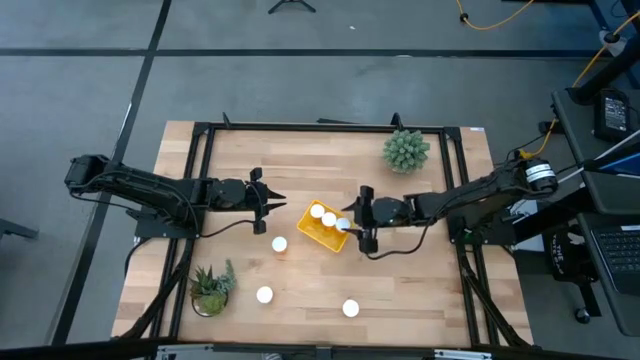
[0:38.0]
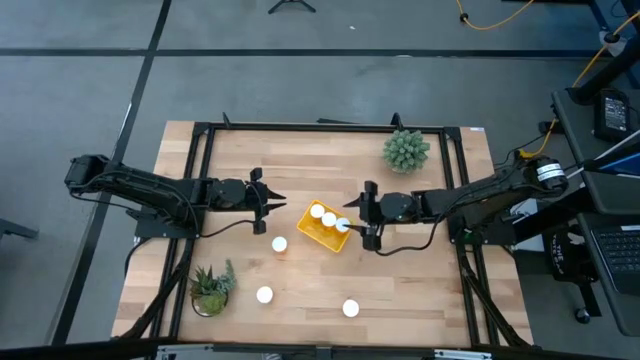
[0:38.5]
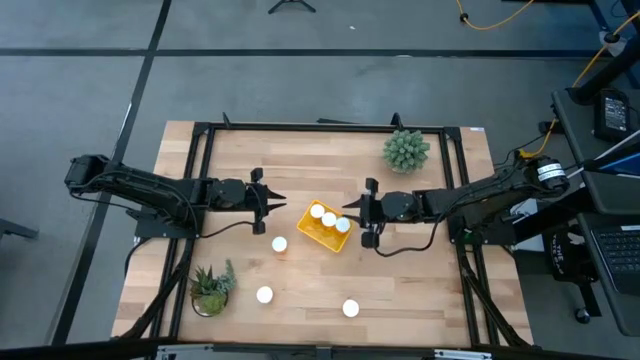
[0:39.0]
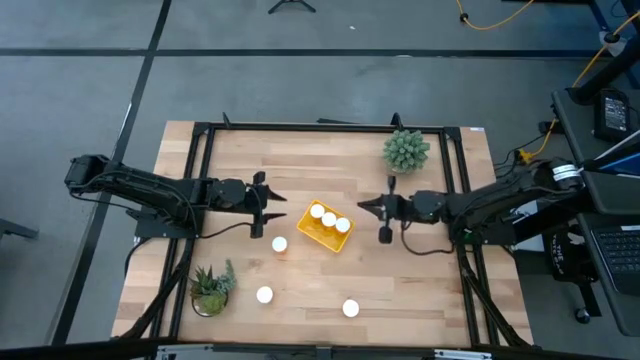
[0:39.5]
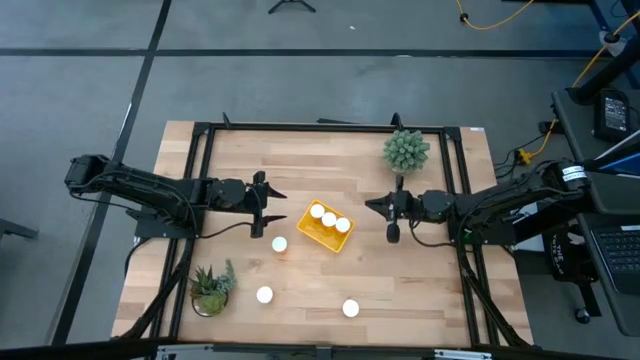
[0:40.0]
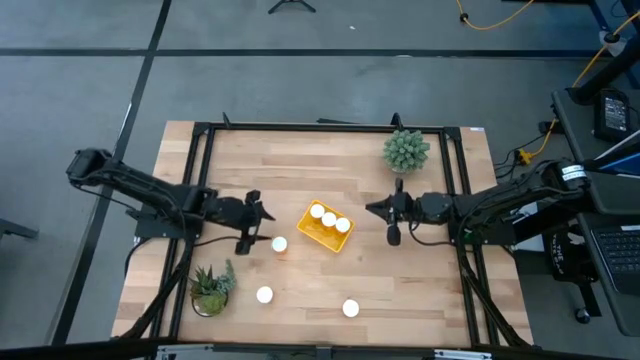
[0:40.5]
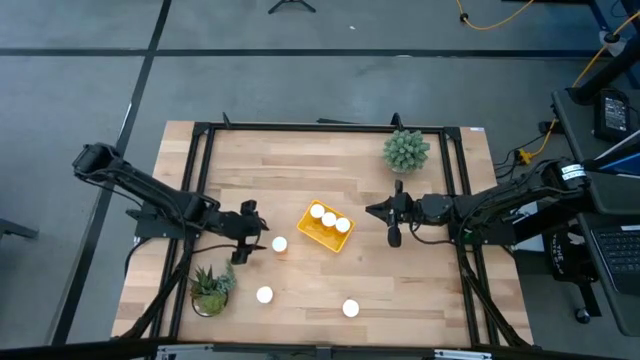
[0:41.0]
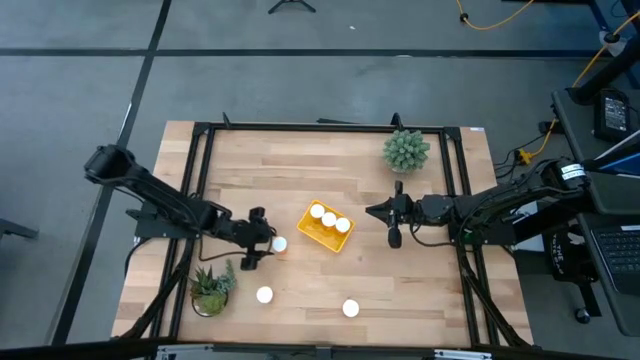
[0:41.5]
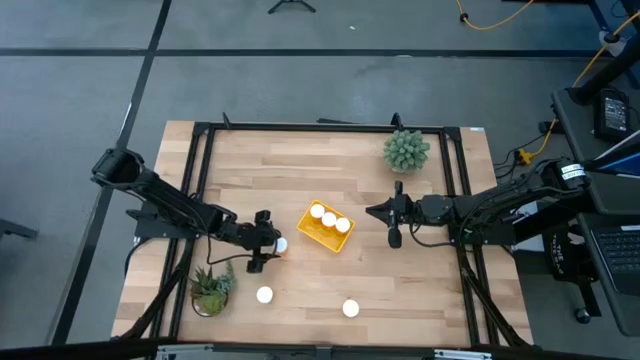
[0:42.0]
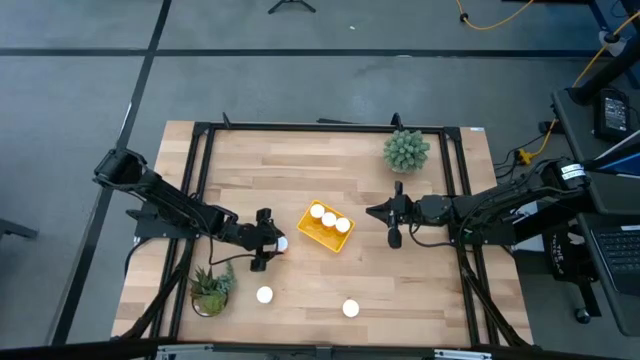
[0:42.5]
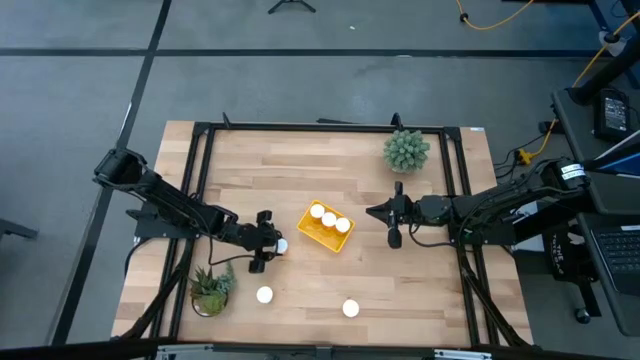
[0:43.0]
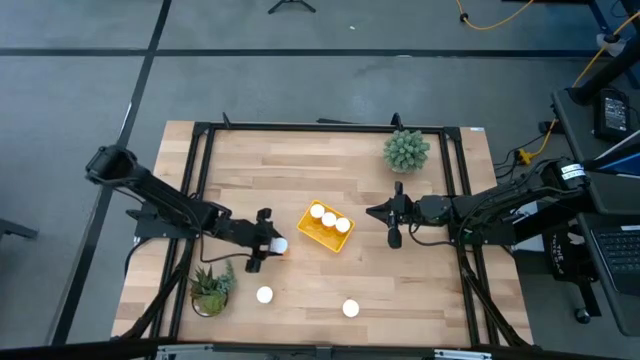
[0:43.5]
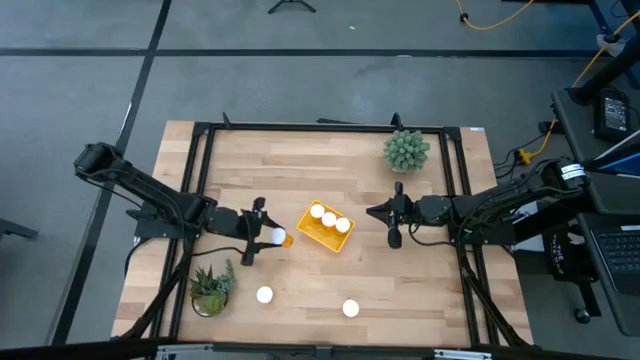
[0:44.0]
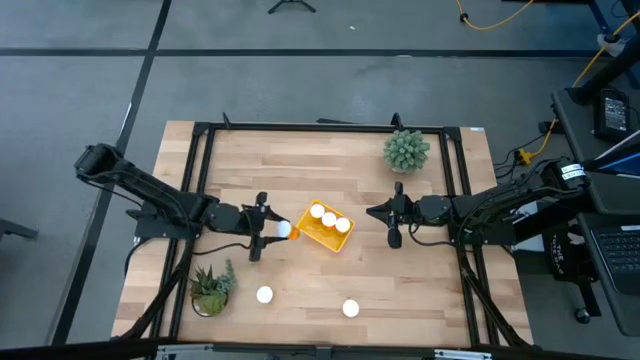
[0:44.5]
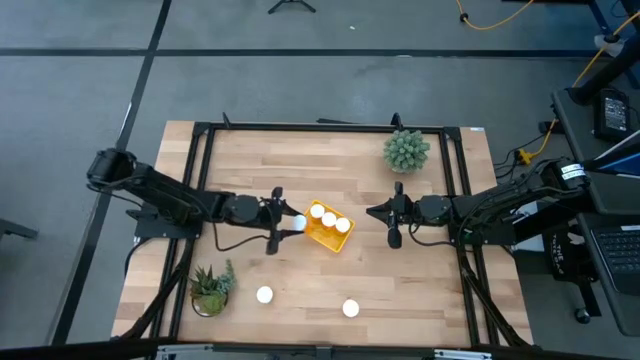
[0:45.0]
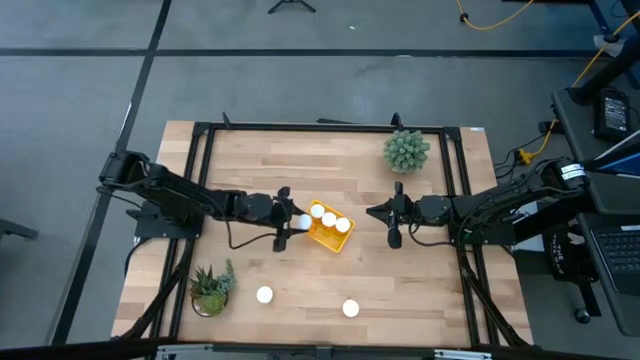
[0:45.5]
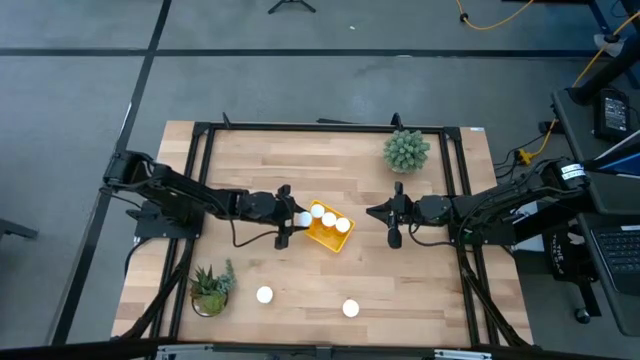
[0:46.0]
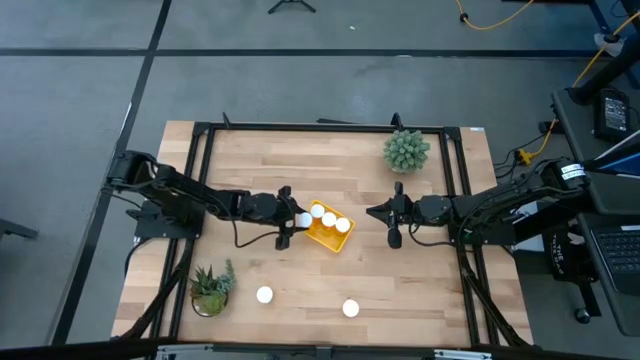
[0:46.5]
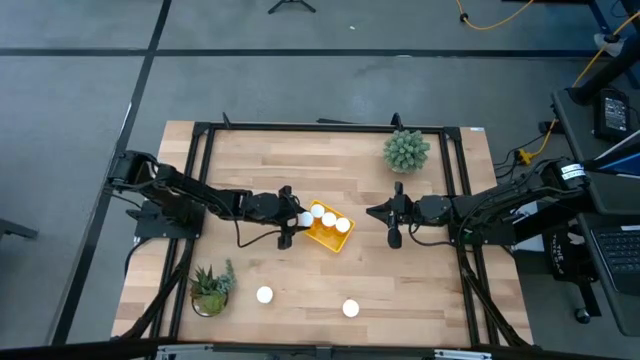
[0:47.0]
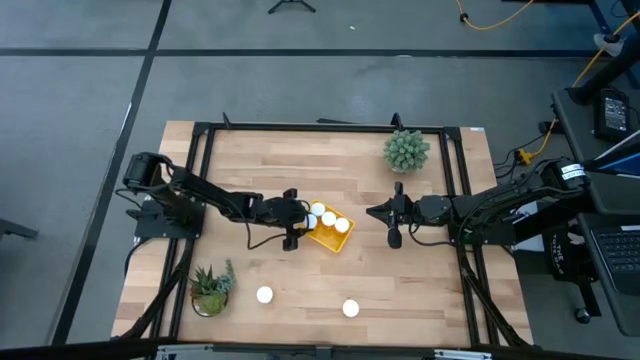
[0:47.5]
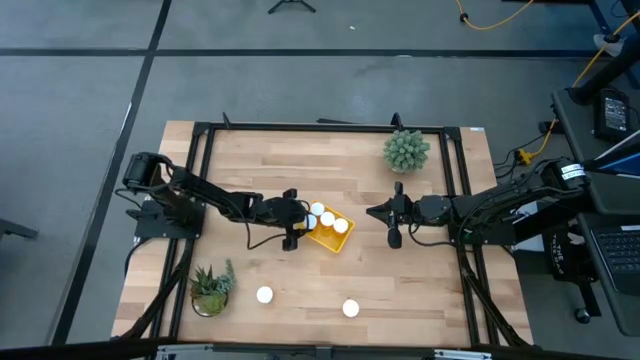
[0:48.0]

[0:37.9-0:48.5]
Task: Pick and place pill bottles into a basket
Put the top orange pill bottle into the yellow bin

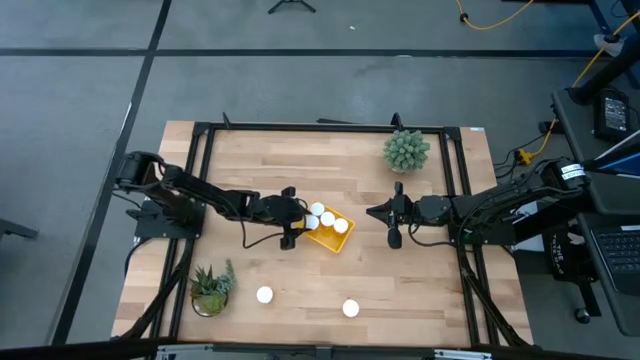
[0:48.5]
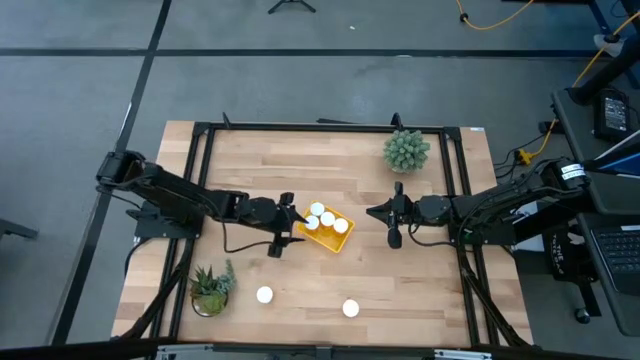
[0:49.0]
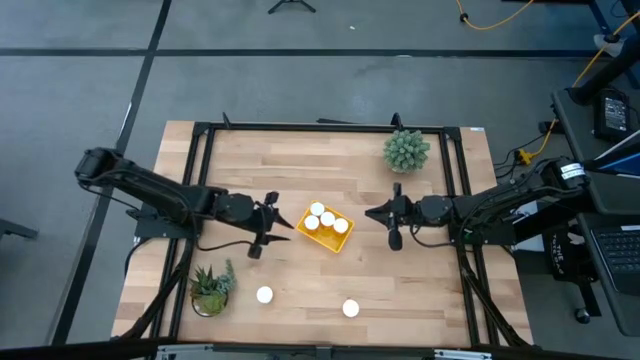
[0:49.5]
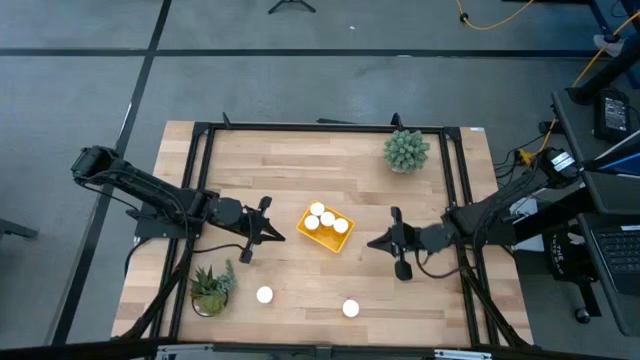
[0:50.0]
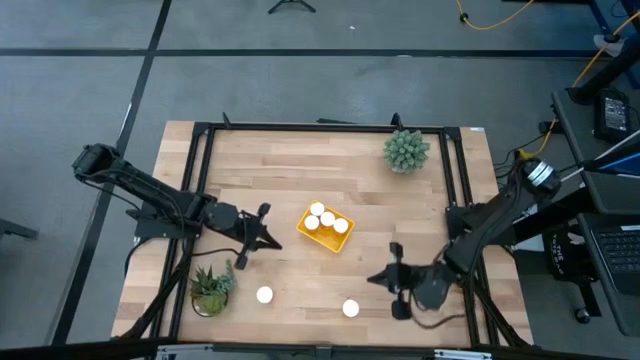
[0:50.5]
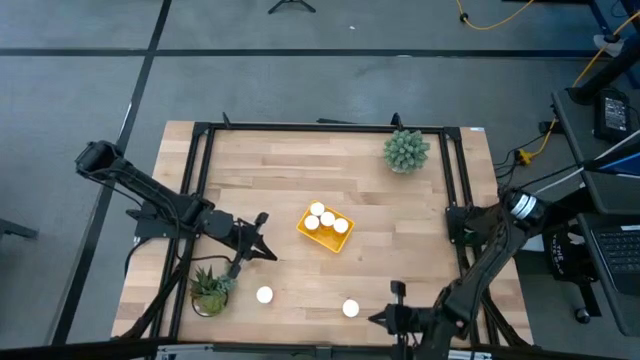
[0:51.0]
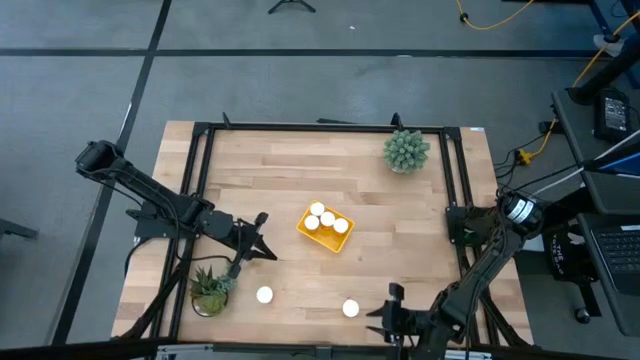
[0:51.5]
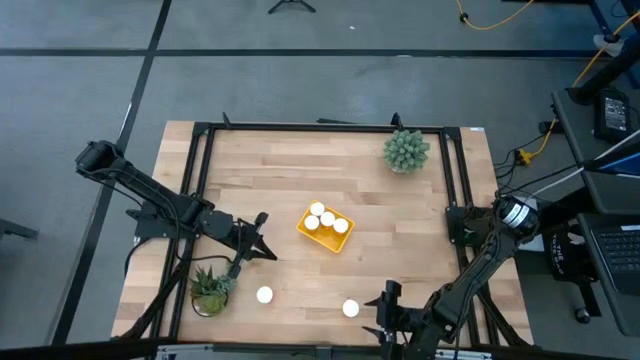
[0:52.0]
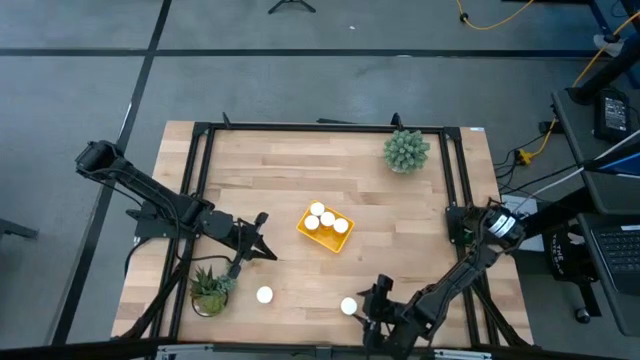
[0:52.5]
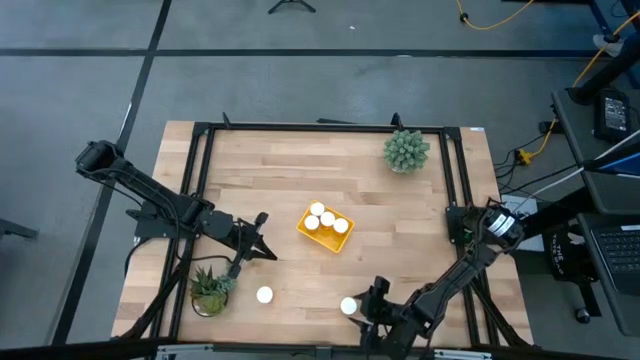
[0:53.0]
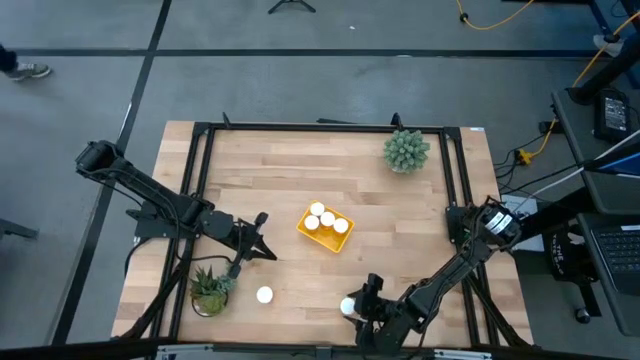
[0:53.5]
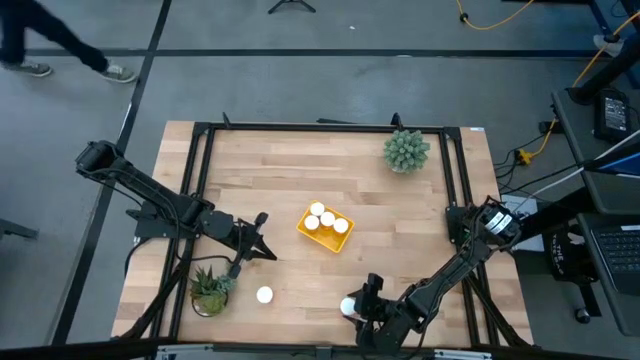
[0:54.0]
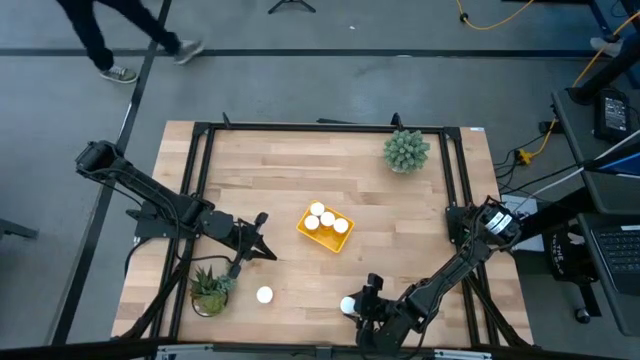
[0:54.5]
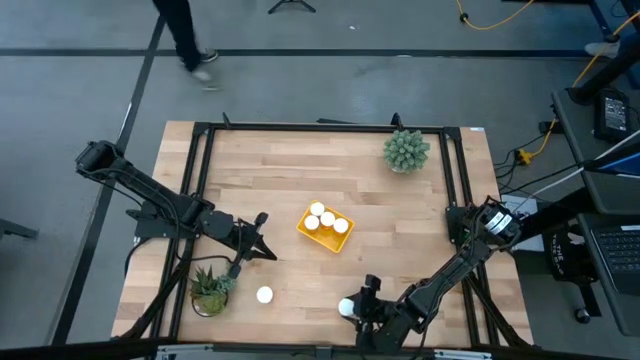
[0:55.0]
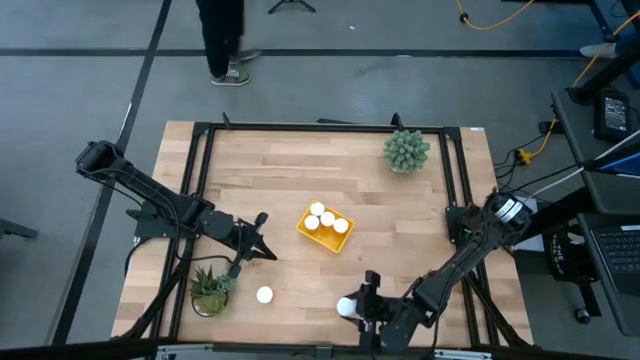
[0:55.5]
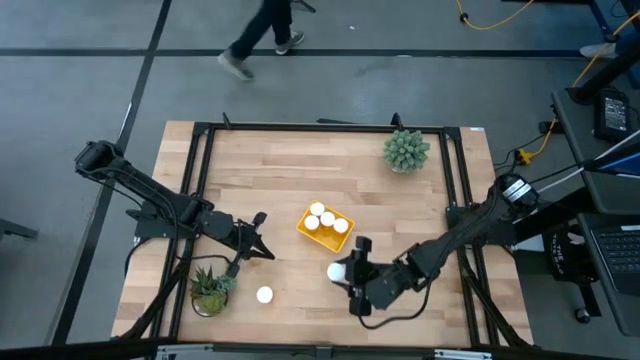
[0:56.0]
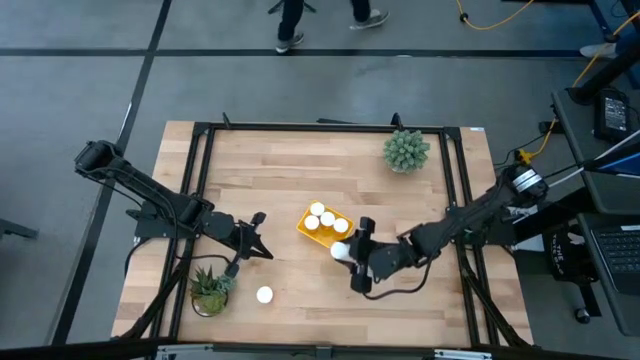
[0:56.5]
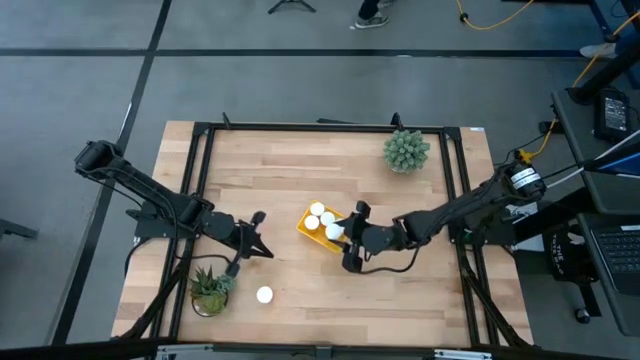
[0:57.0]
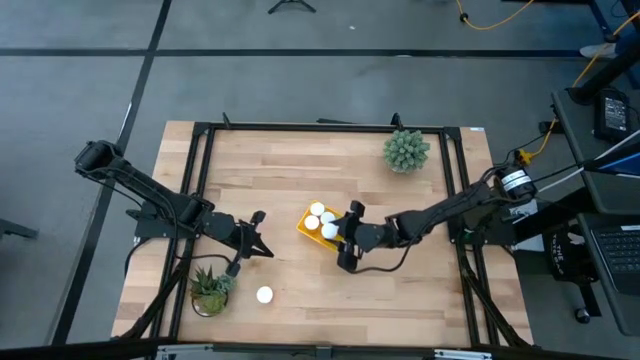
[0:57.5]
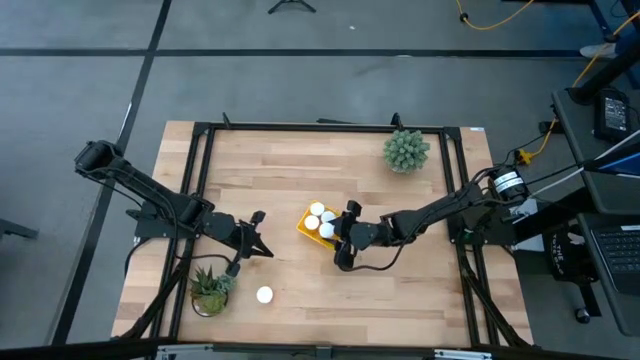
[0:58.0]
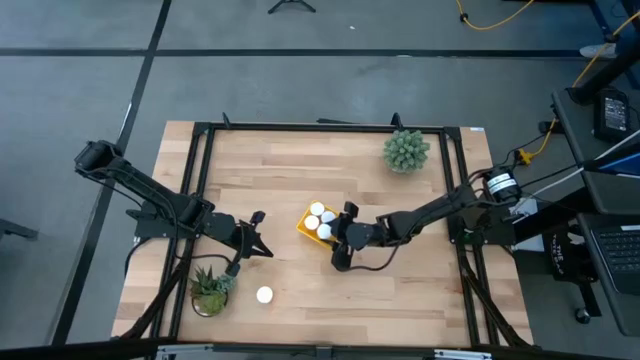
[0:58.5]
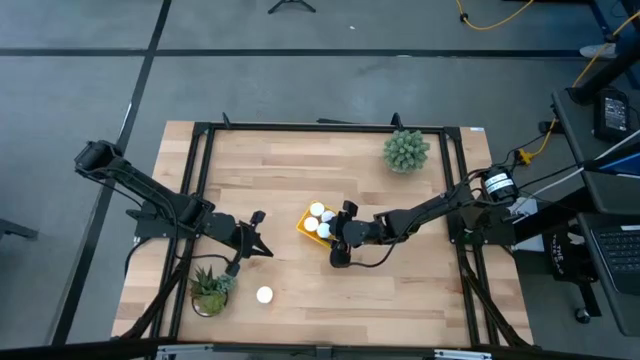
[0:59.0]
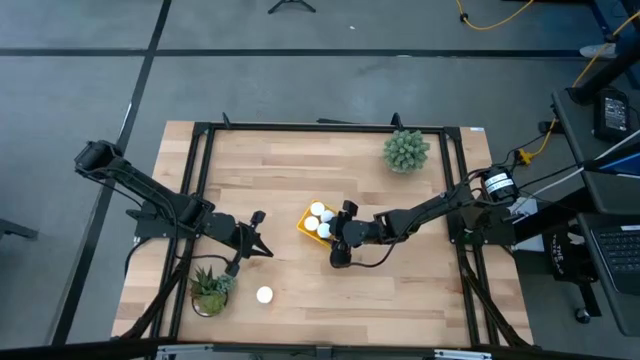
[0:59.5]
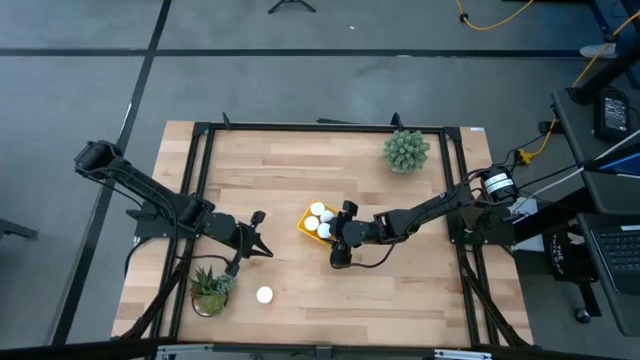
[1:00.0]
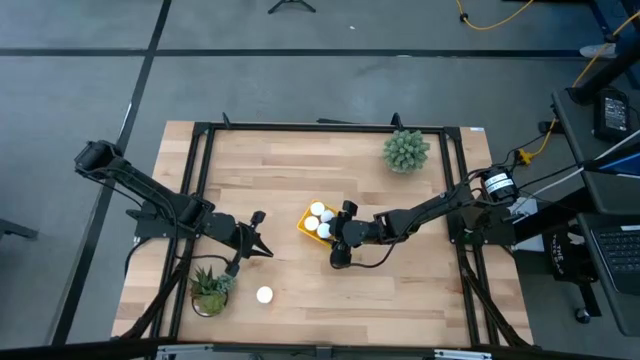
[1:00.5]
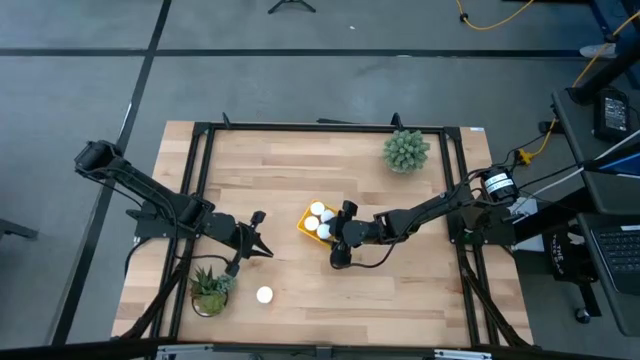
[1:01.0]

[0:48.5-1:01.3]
Put the right orange pill bottle into the yellow bin
